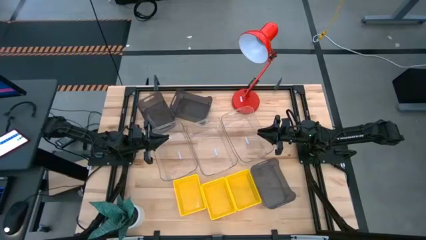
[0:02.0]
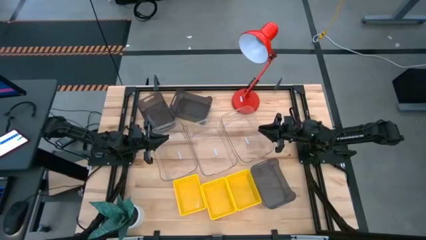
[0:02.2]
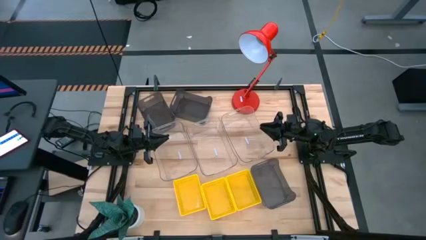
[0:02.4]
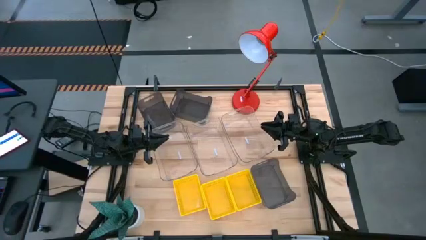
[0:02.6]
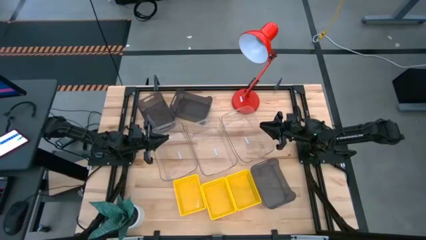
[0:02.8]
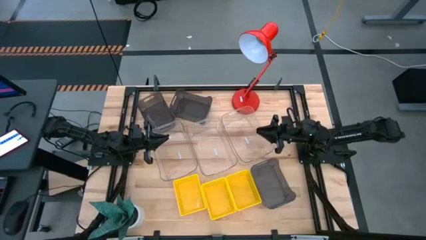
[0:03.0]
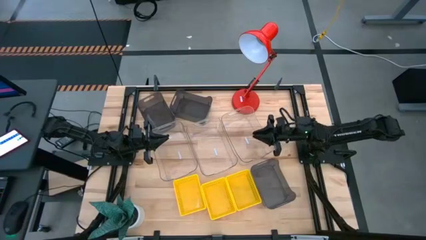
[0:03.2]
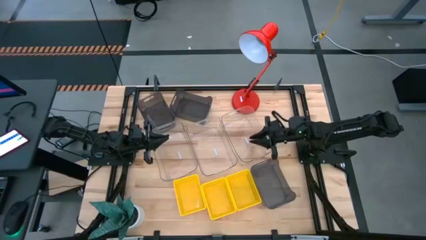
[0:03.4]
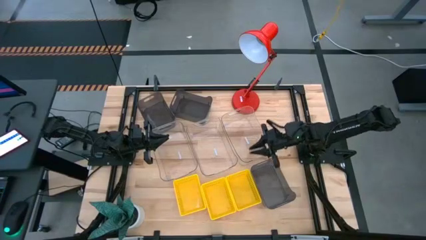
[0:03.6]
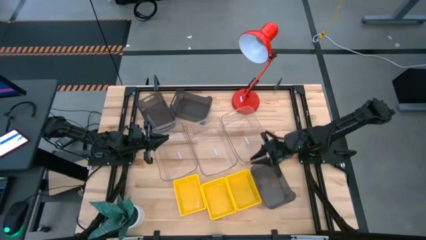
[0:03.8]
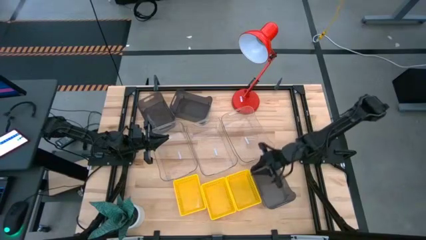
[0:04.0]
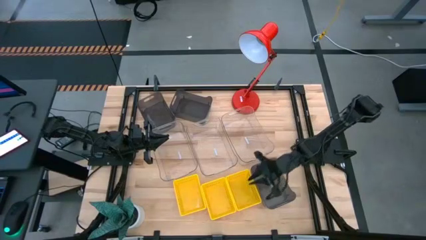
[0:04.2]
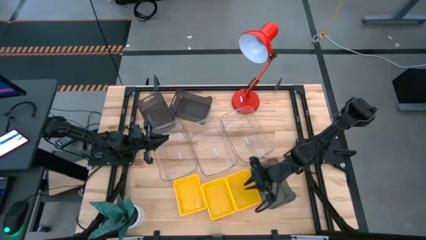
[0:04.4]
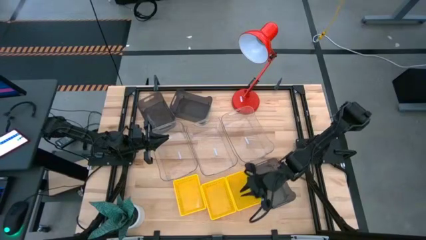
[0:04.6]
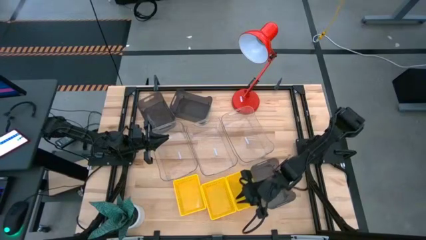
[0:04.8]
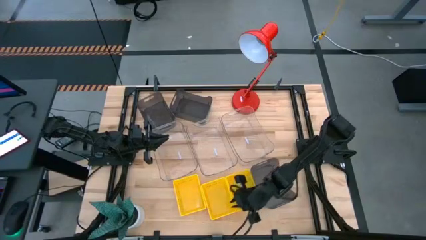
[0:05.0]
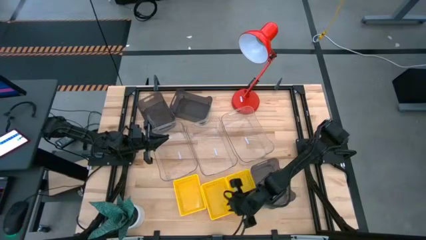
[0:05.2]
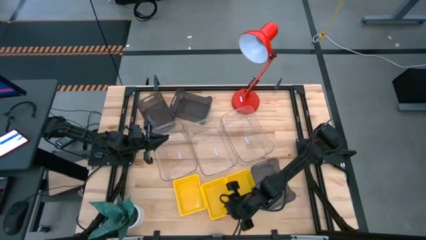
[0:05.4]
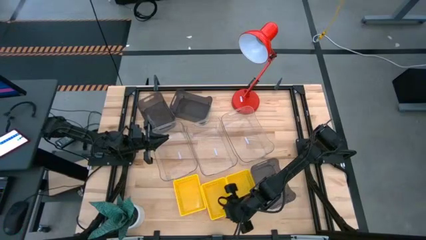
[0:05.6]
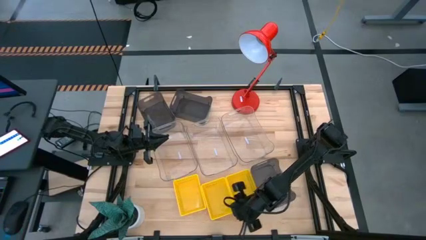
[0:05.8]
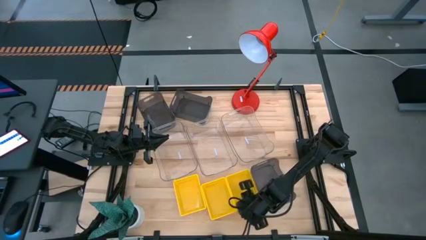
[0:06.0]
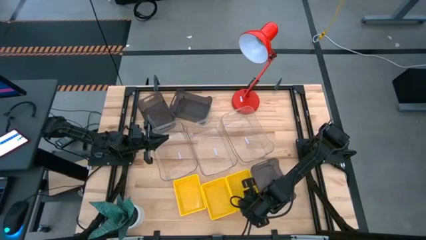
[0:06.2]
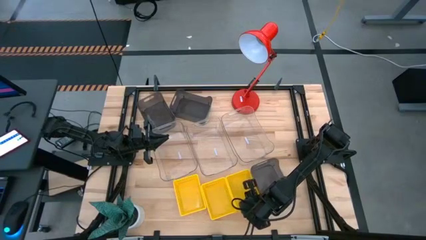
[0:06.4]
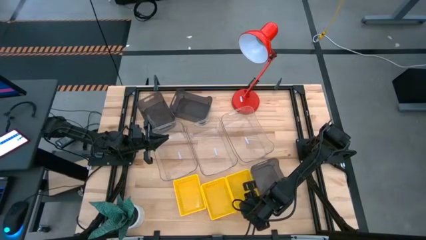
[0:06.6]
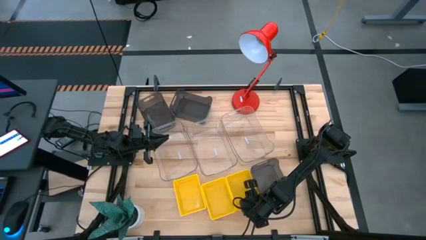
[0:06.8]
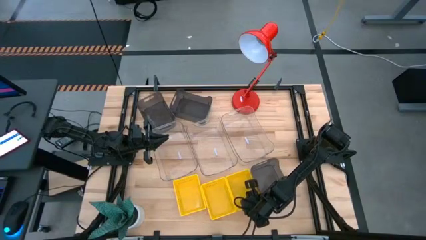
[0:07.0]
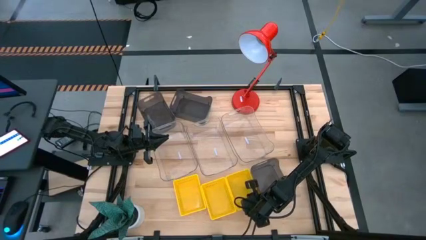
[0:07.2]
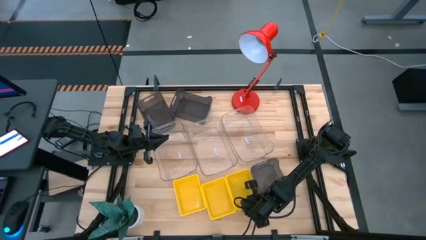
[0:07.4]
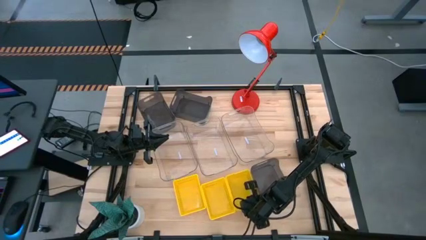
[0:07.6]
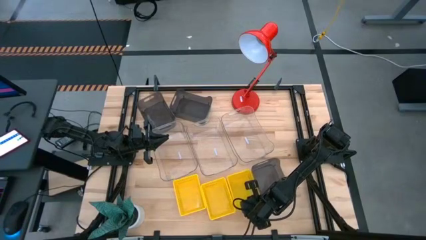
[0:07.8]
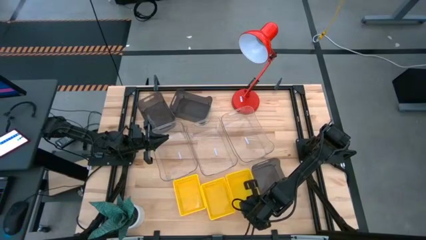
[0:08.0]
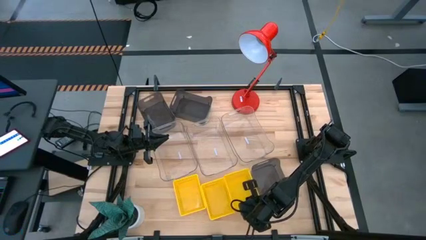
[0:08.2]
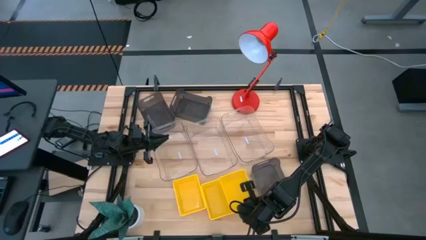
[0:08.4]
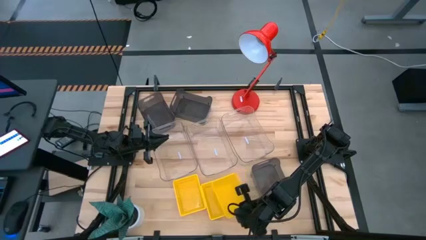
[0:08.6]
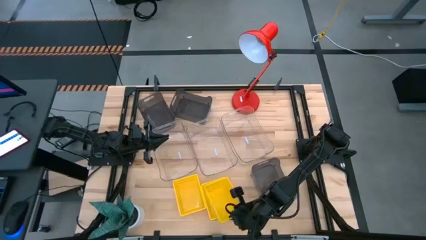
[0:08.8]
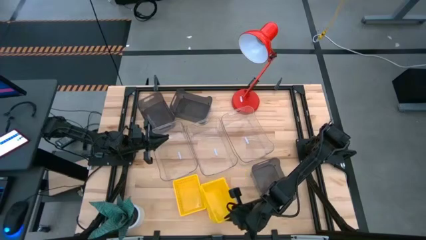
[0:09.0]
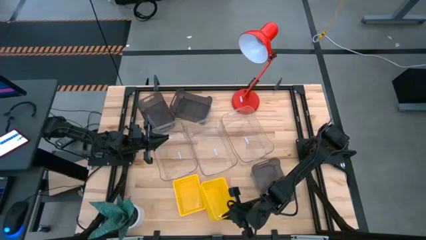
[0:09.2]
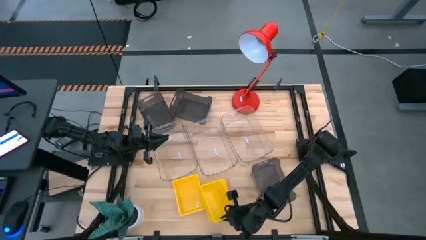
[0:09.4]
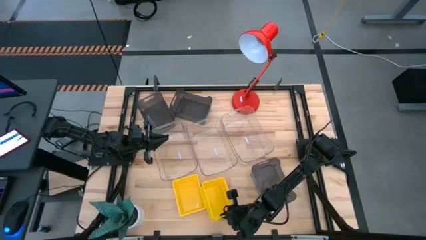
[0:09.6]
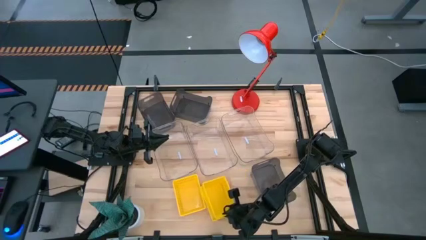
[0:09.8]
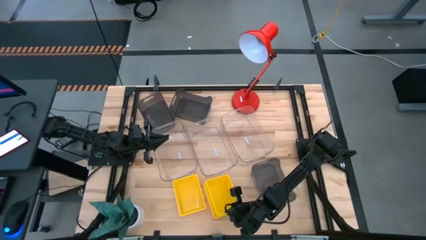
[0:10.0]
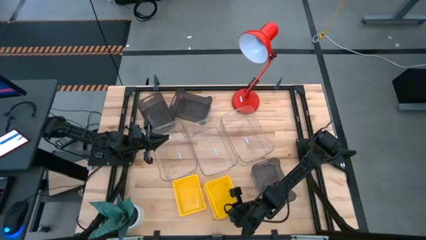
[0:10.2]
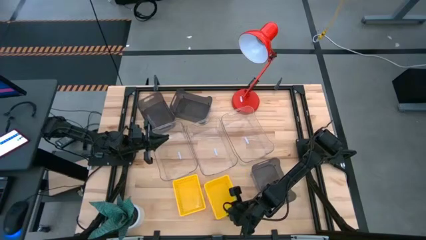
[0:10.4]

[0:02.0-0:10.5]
Stack the right yellow bin on the middle yellow bin

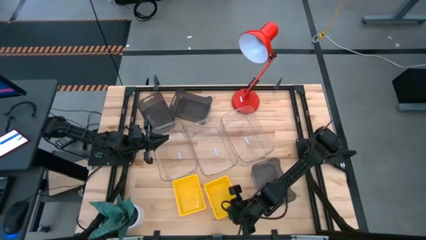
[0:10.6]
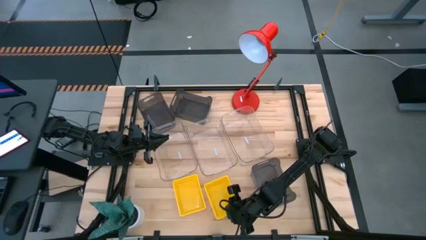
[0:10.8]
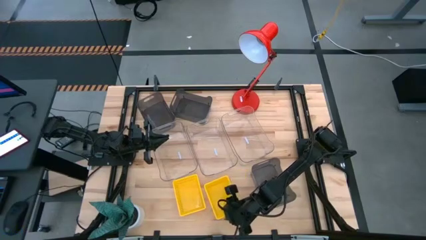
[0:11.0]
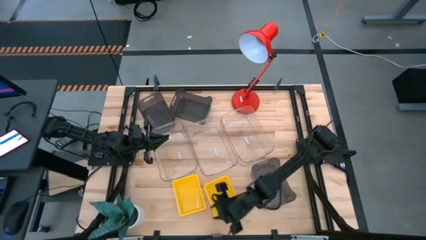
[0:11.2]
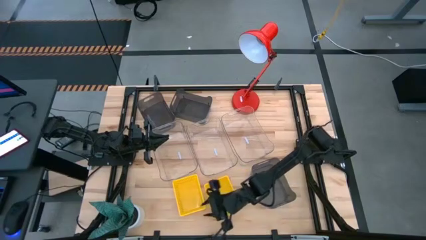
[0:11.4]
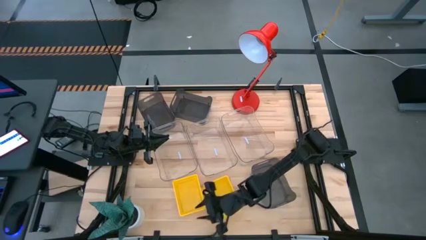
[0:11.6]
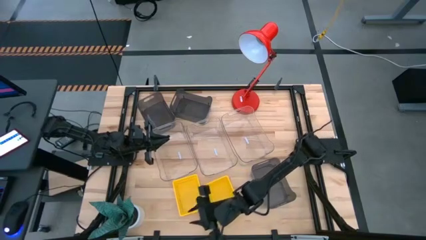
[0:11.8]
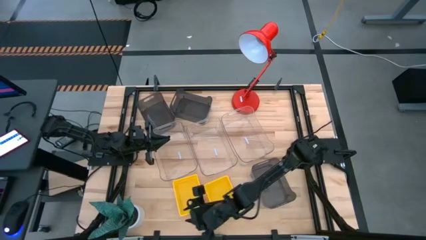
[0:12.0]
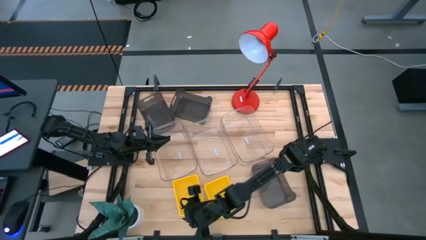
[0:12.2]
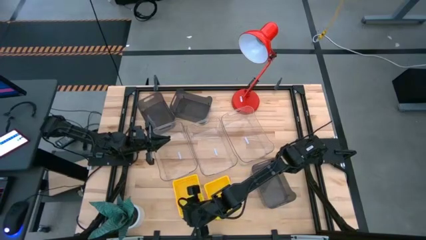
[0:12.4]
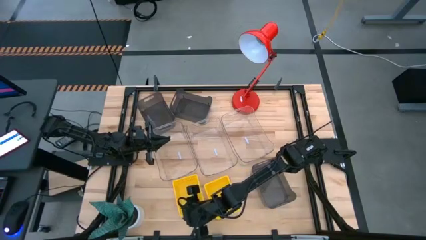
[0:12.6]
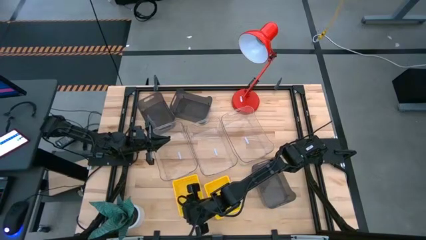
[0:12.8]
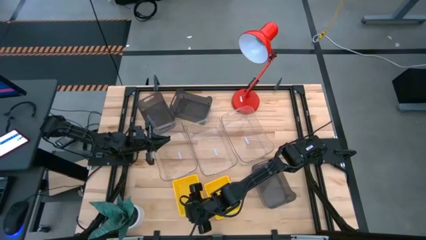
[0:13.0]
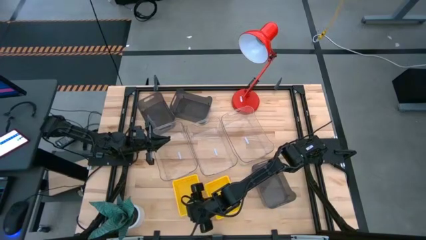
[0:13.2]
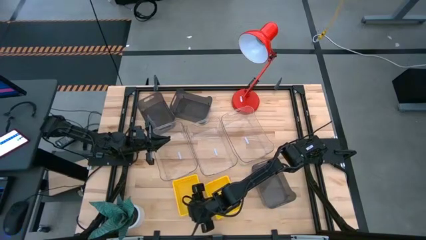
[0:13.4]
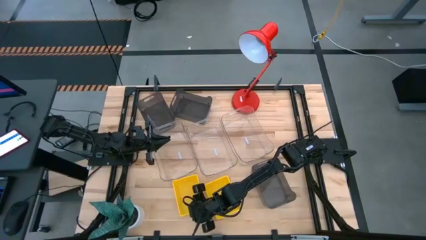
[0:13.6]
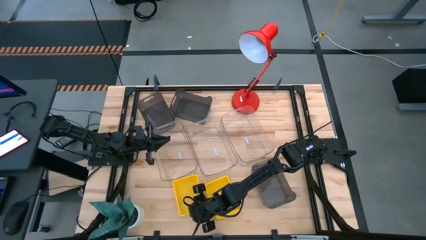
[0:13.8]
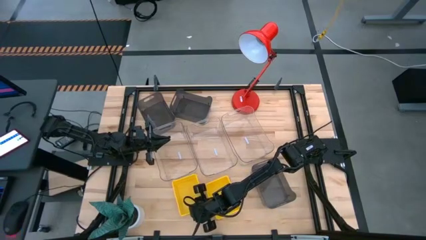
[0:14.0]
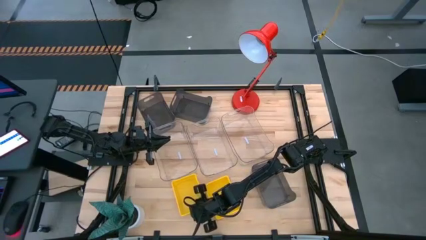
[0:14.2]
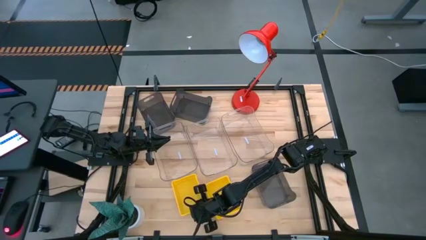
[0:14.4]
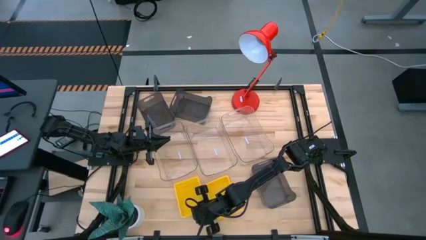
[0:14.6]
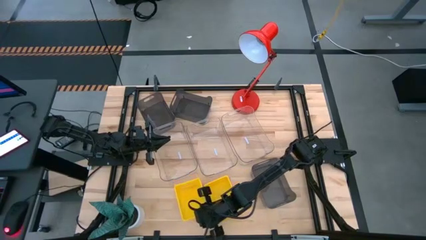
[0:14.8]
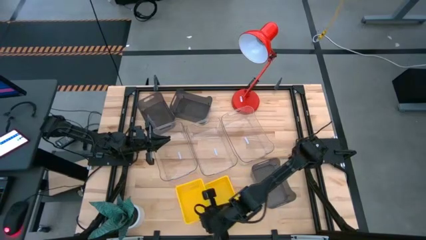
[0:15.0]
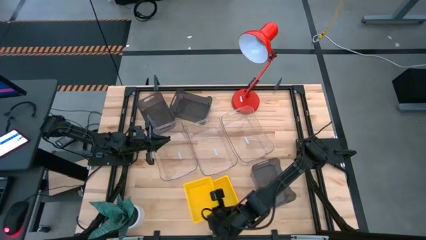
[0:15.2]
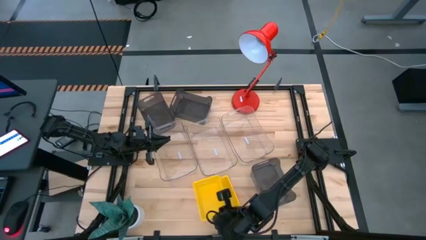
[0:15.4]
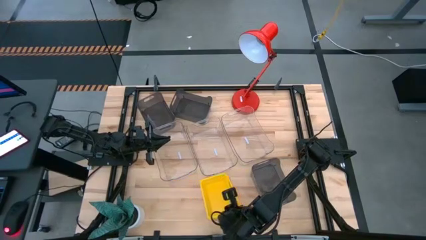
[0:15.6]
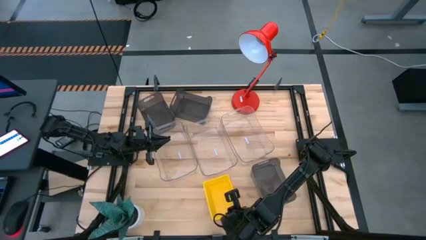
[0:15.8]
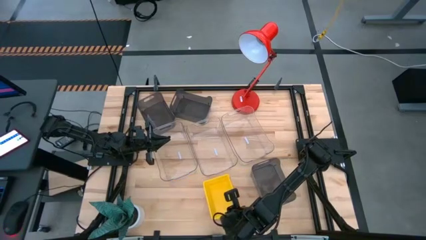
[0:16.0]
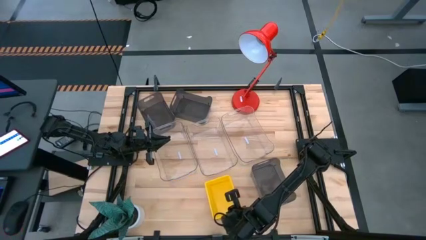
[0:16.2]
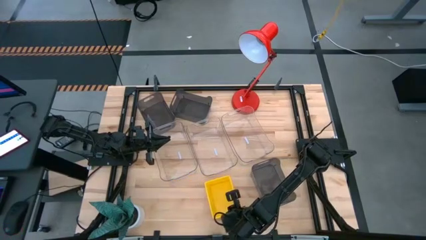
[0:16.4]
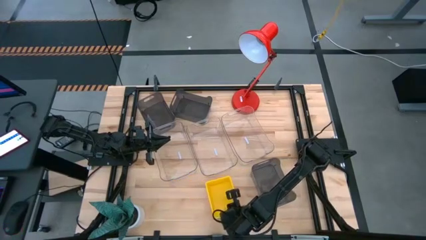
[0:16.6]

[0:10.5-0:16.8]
Stack the left yellow bin on the right yellow bin
